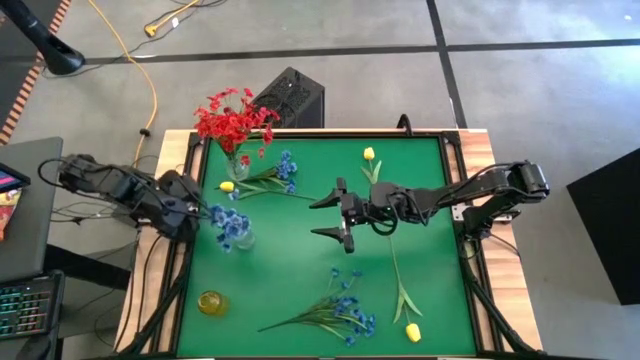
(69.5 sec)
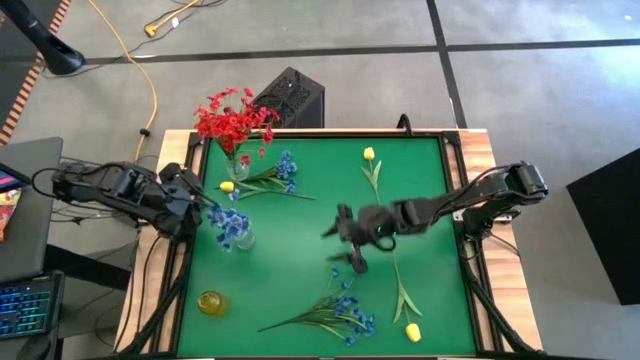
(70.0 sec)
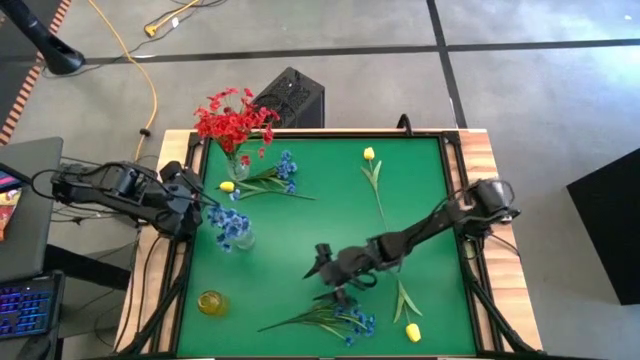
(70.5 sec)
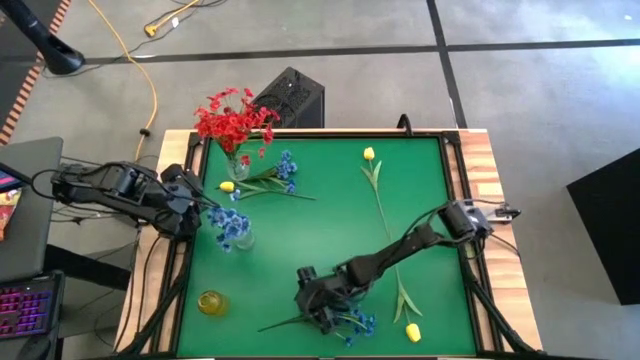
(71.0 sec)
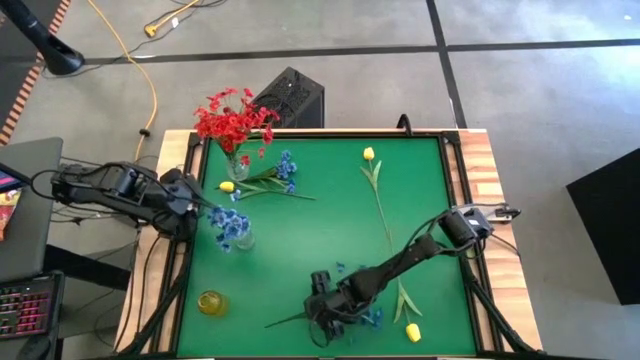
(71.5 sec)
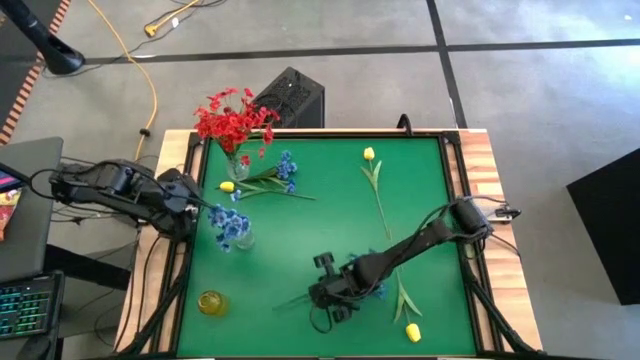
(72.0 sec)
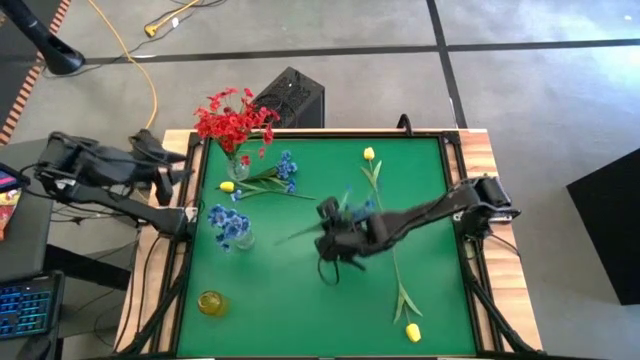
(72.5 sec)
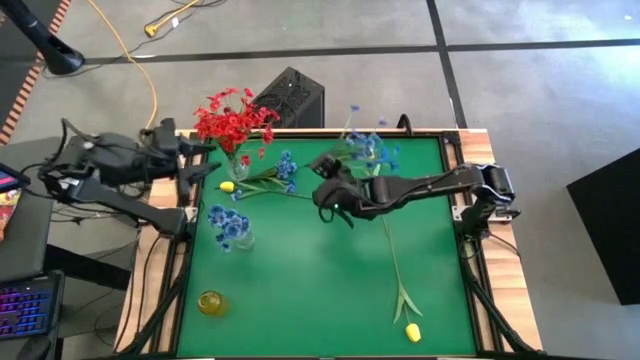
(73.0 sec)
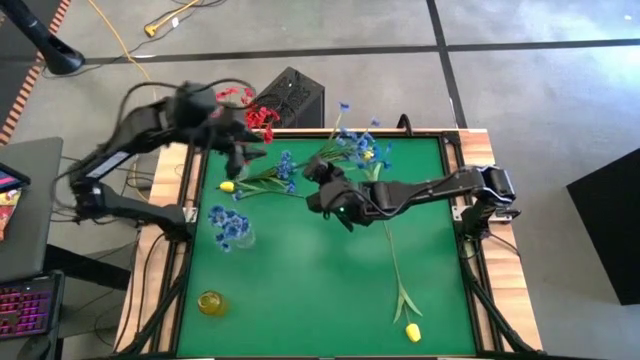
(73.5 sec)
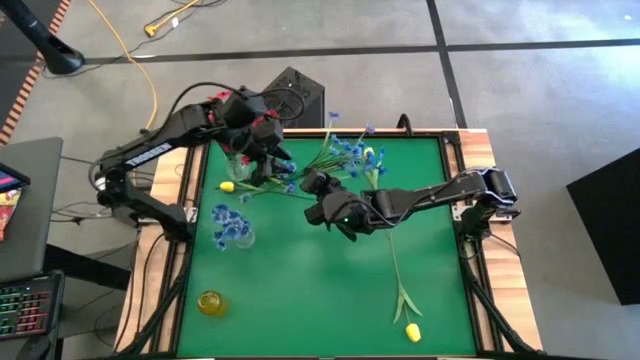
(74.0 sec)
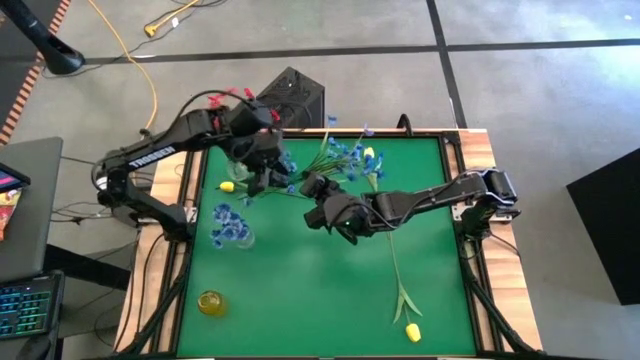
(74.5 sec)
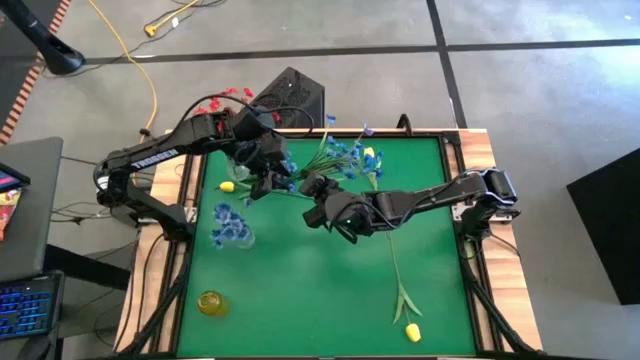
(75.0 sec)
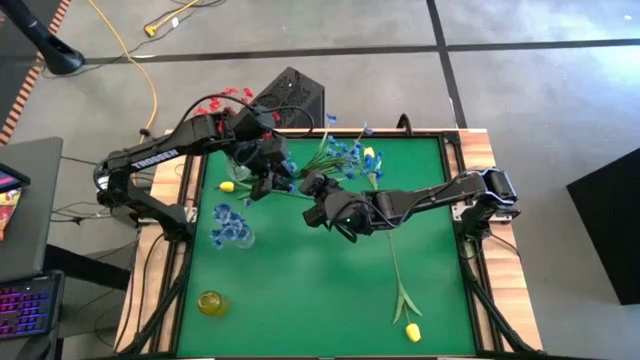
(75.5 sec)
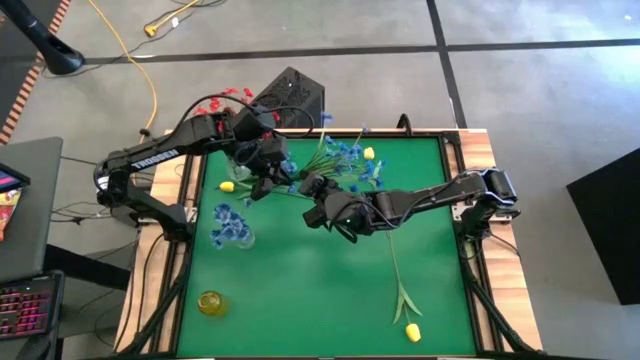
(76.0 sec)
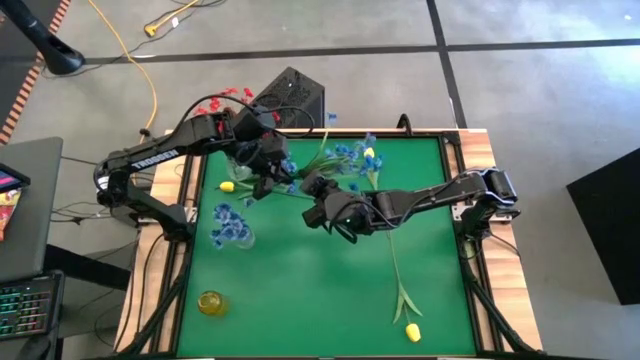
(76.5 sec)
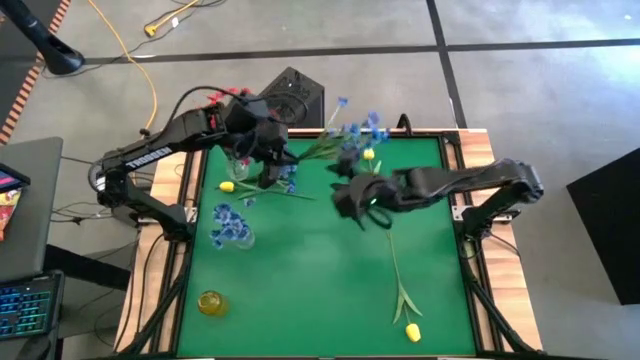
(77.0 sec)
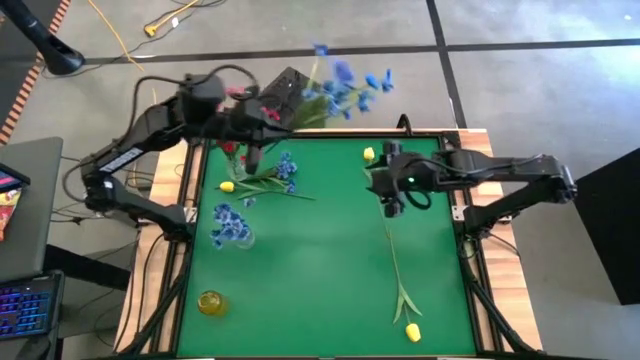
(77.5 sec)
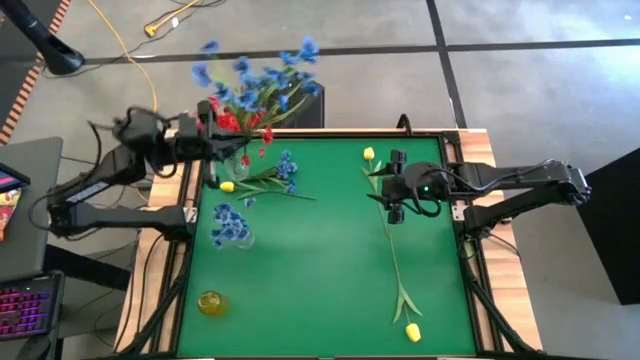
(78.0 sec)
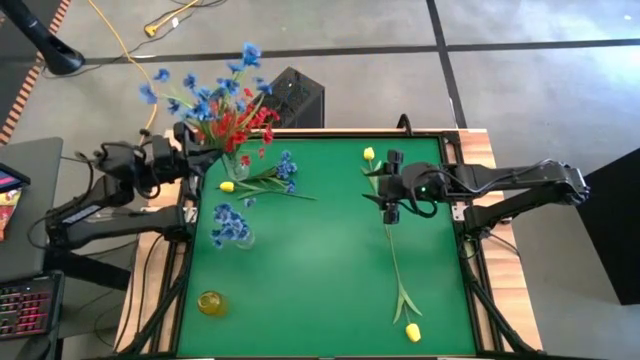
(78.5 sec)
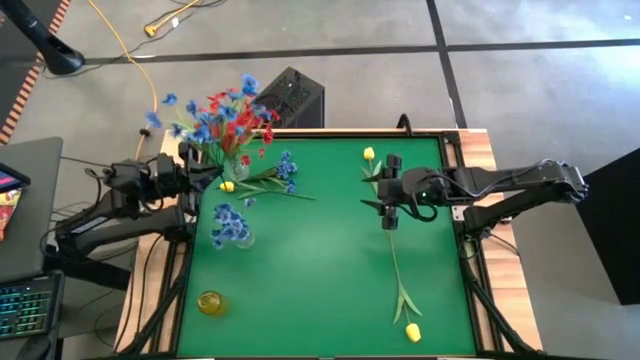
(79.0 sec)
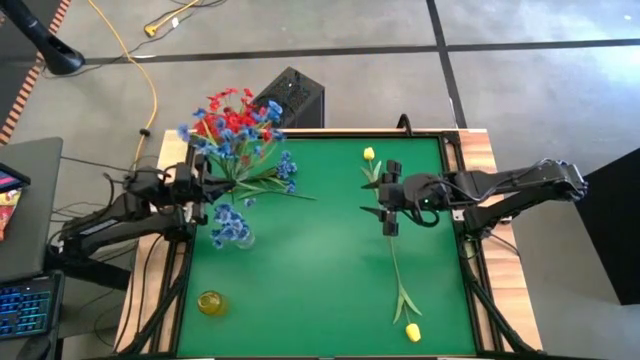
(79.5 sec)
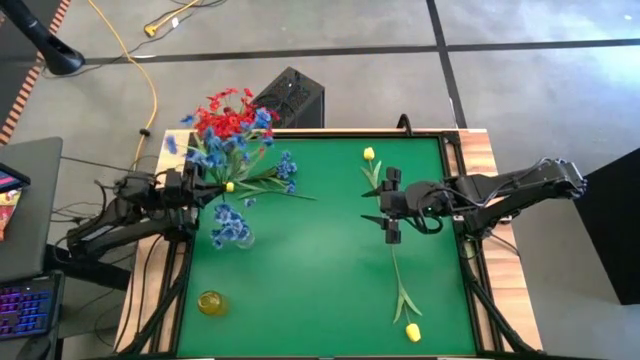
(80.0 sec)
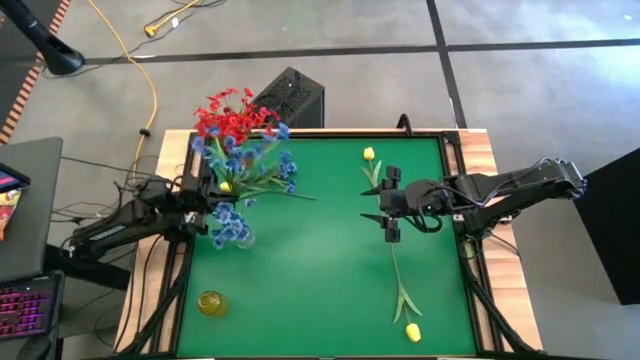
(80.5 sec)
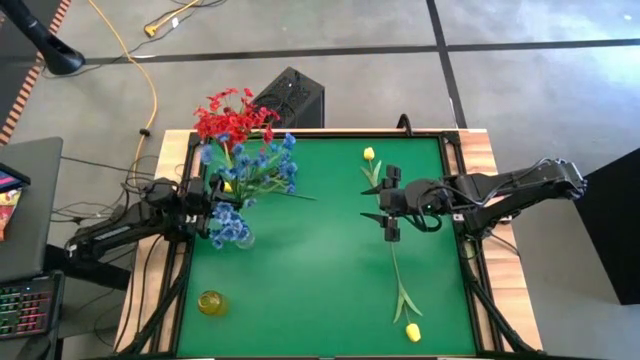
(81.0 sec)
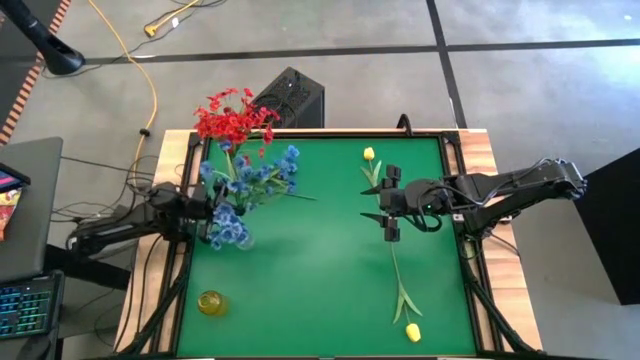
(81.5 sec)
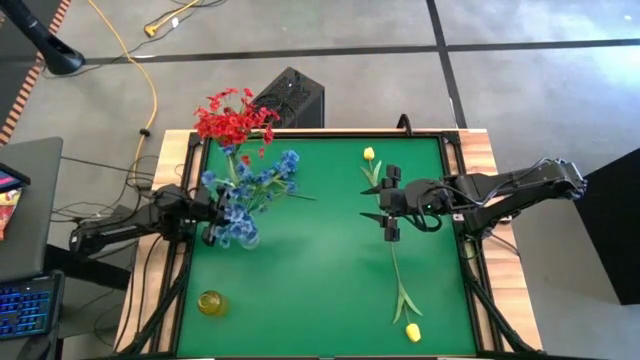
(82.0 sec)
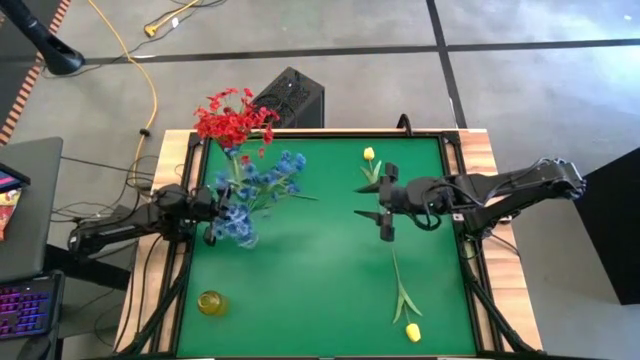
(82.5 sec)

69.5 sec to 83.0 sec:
Task: Sort flowers into vase by color
Put the bottom blue flowers into the bottom transparent vase
